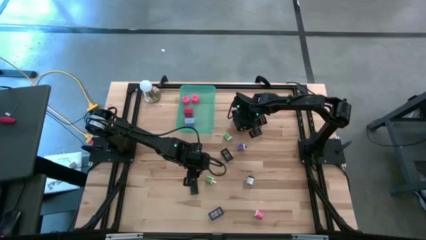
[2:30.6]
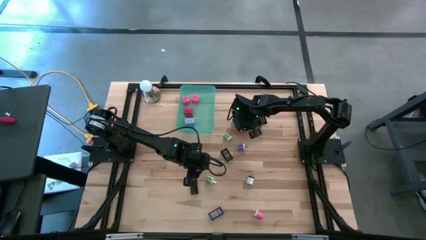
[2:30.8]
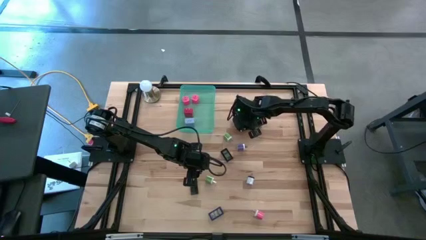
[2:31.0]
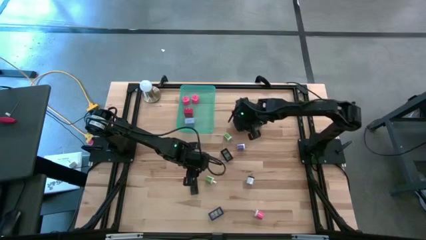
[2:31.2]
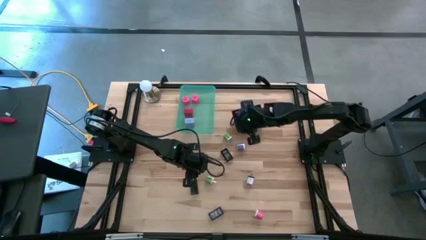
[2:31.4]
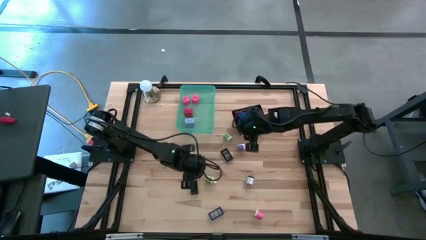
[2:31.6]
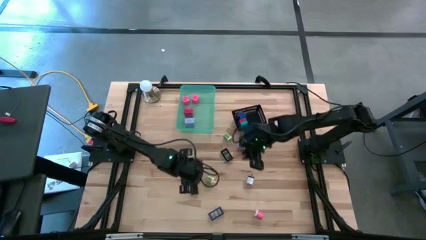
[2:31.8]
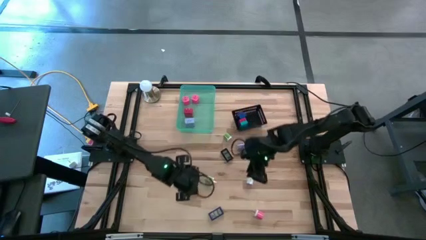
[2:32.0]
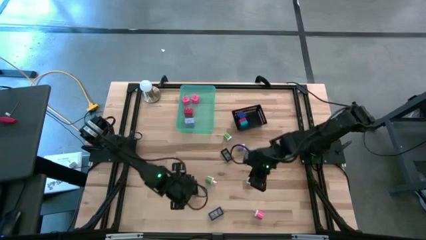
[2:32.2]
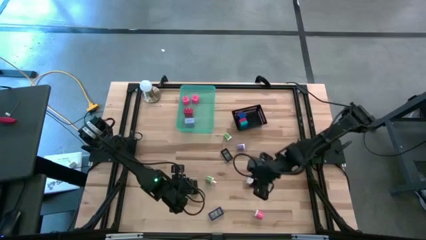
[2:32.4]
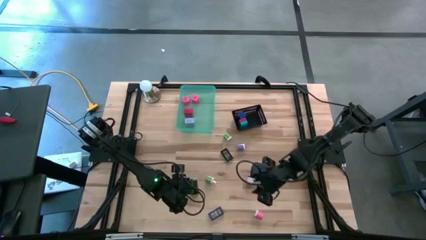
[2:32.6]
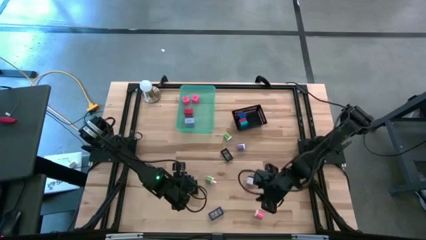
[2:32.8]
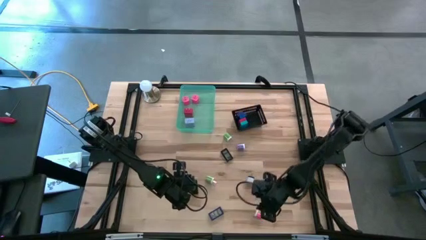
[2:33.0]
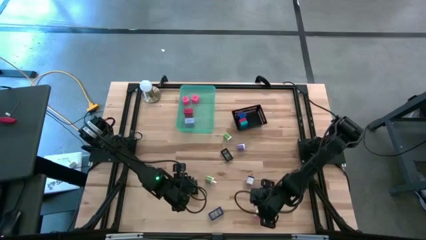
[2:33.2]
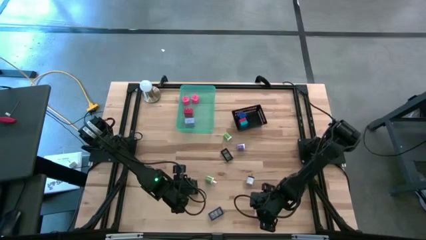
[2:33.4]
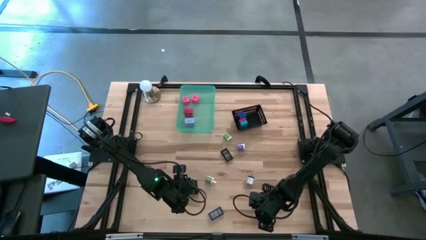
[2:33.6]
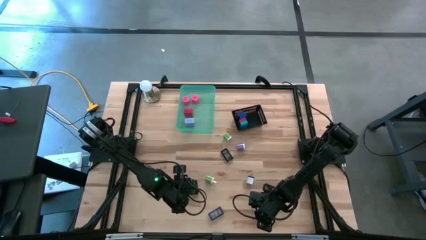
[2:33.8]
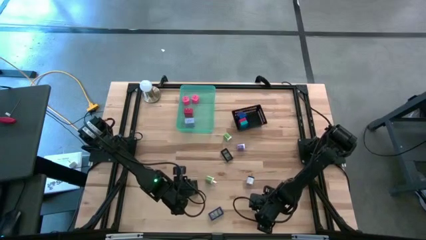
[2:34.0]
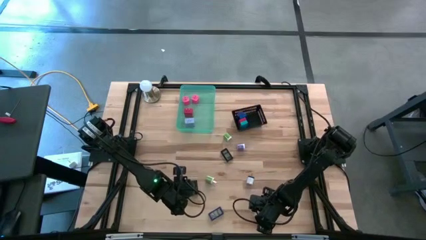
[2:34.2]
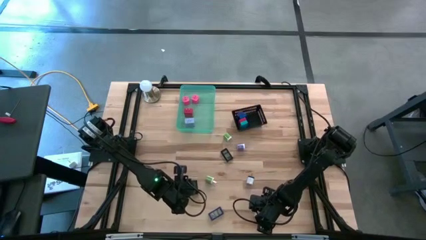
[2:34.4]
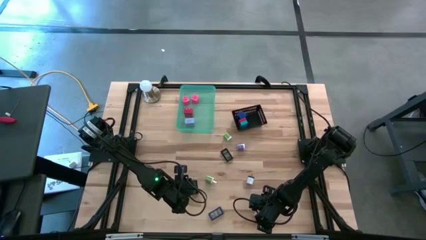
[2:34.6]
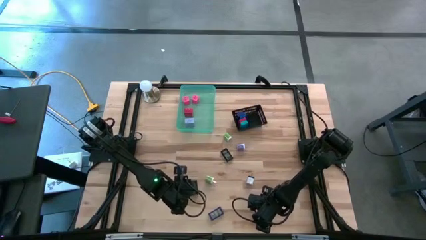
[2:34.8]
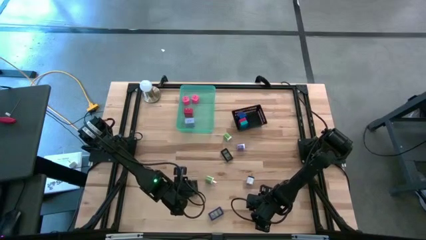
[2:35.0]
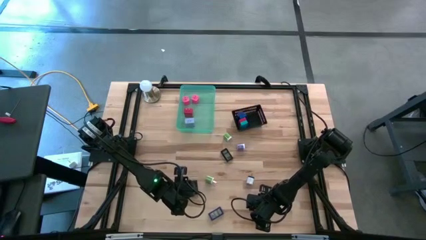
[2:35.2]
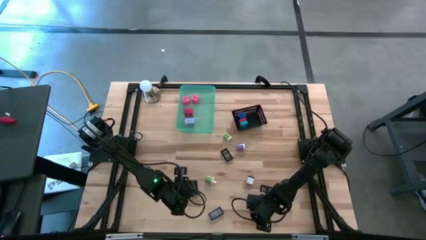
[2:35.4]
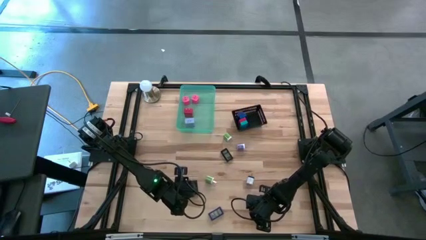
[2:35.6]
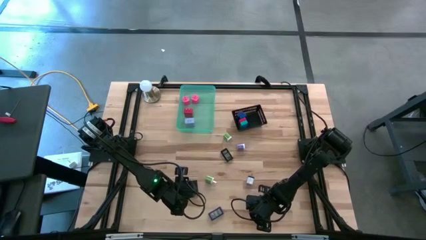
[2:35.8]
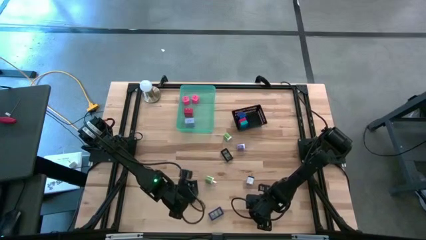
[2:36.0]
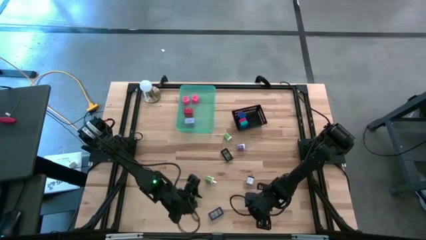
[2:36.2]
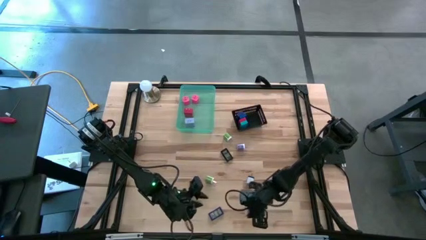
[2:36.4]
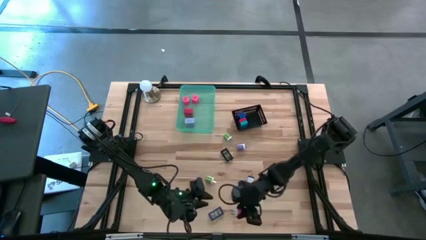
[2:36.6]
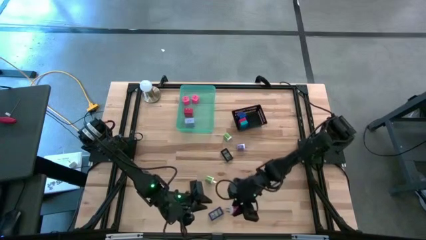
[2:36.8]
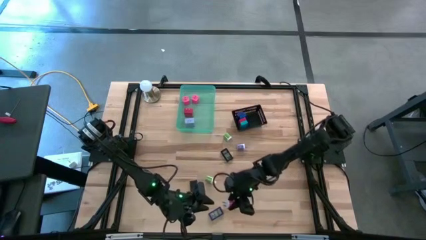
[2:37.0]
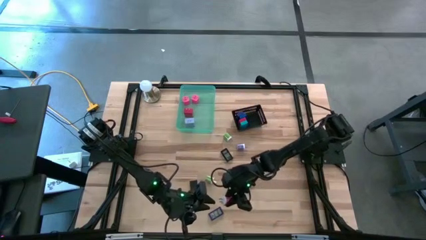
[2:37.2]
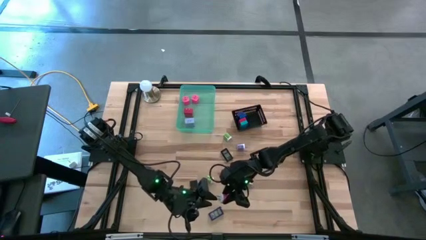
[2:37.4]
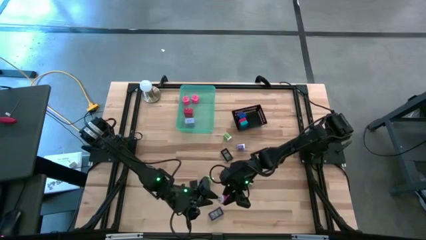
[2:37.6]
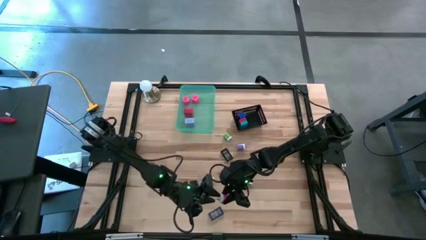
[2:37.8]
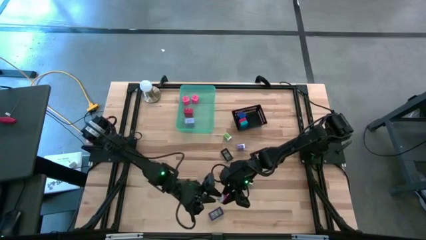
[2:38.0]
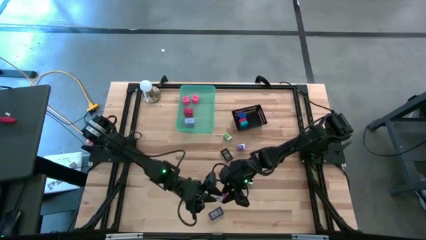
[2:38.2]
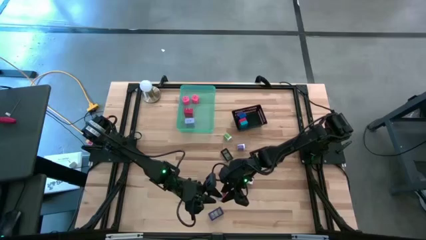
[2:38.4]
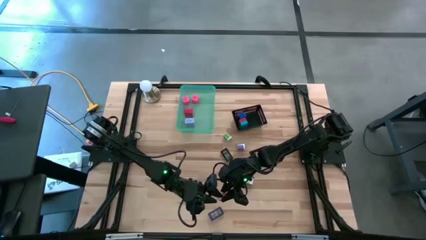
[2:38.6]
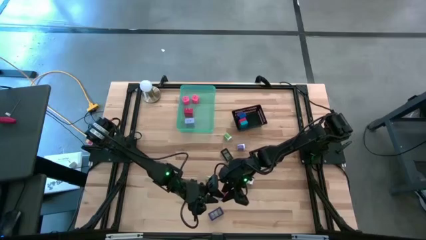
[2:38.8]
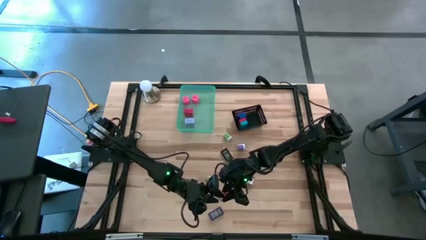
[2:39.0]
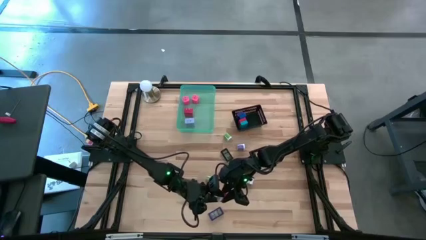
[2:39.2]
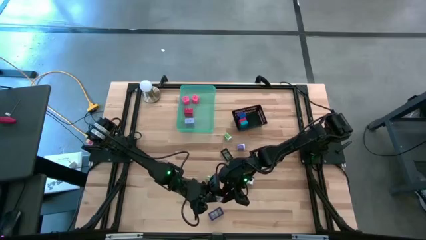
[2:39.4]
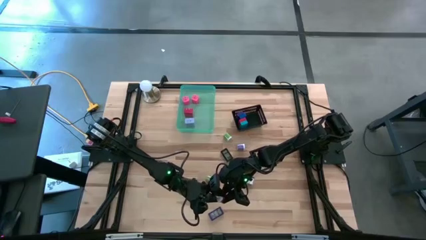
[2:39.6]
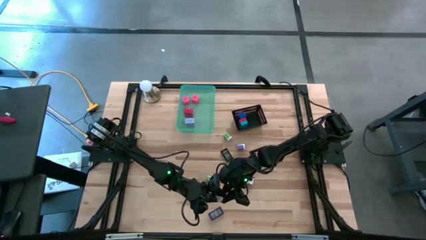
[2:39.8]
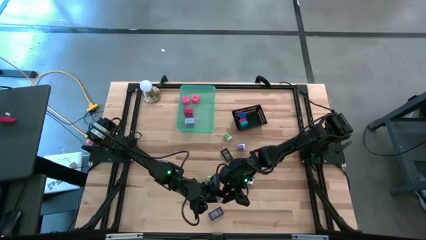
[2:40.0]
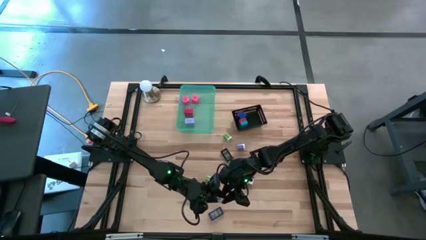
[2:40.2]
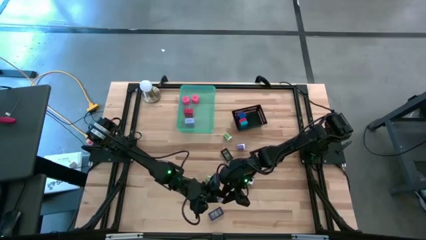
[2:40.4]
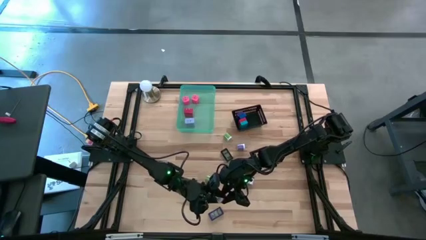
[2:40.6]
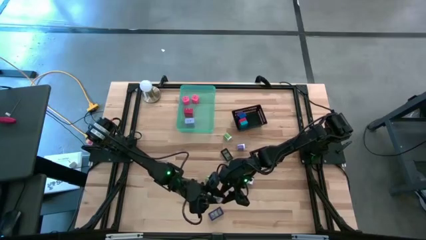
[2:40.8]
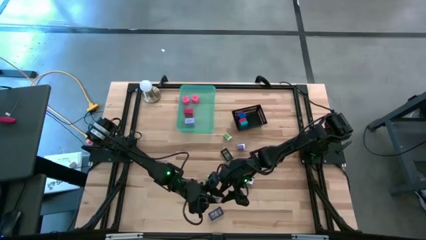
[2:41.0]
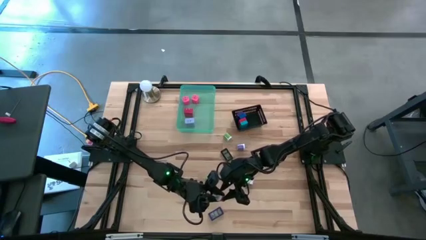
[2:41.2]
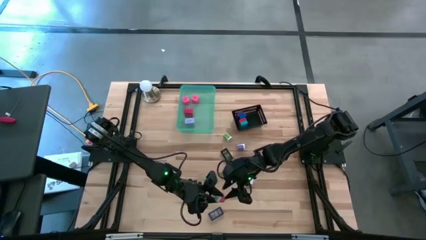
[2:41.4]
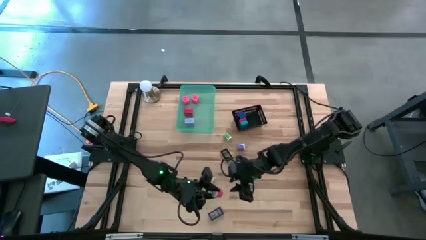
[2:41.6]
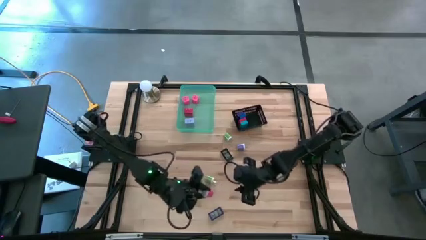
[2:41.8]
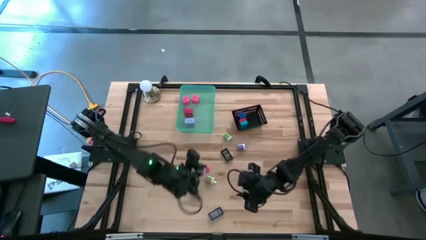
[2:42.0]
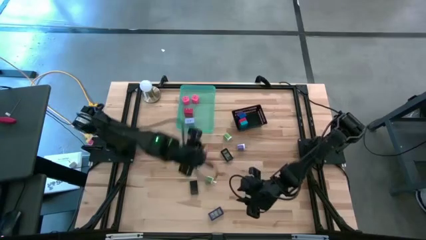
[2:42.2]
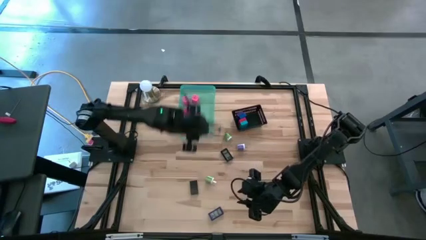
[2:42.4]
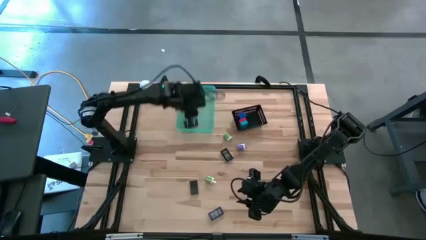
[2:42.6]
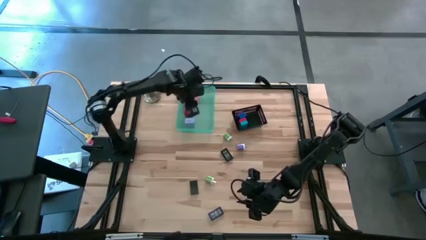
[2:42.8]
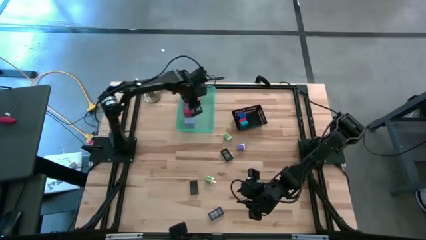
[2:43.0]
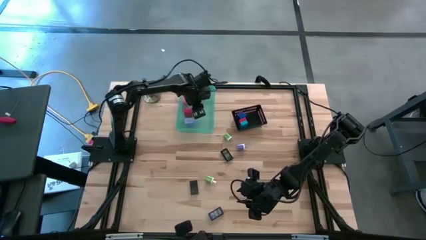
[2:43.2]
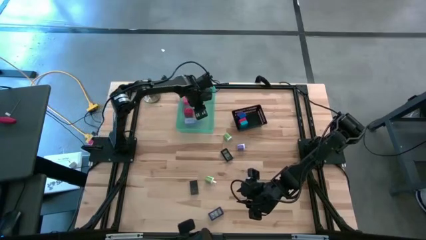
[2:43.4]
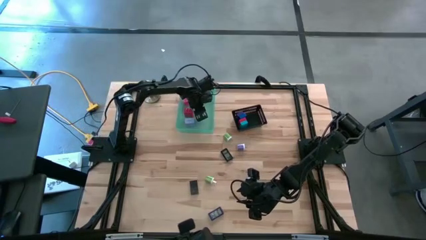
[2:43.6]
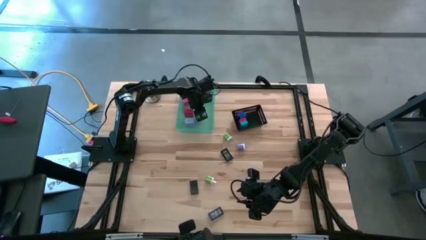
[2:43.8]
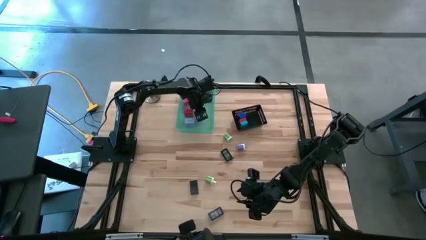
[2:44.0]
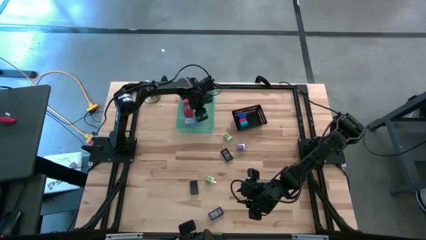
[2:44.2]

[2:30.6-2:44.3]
Task: Pick & Place Office items
Put the white pink charger adapter into the green bin

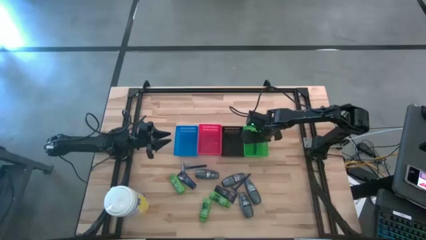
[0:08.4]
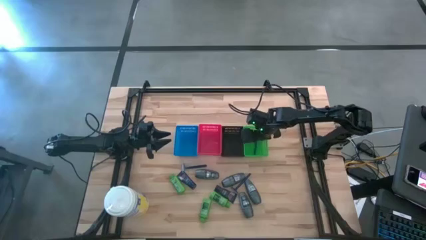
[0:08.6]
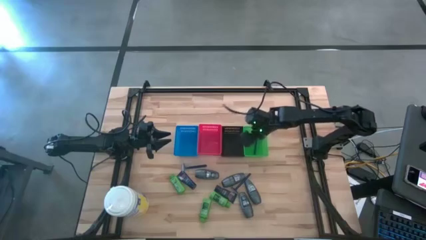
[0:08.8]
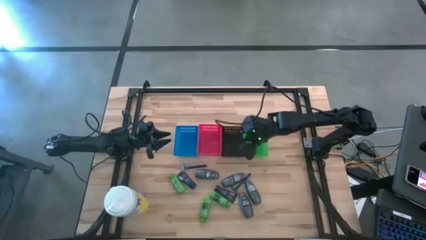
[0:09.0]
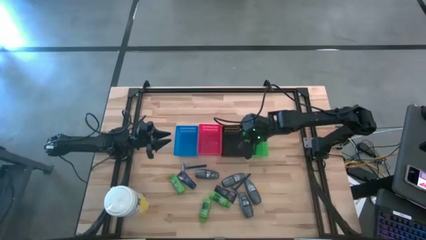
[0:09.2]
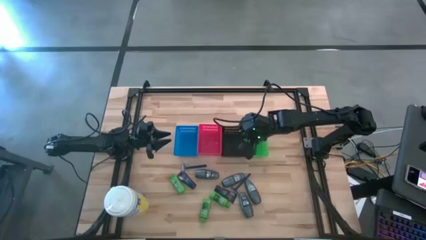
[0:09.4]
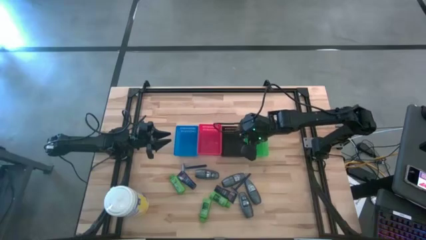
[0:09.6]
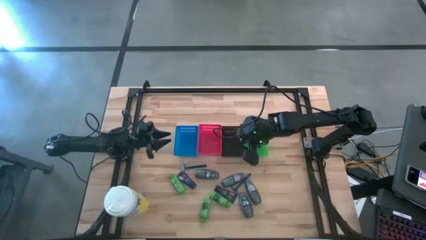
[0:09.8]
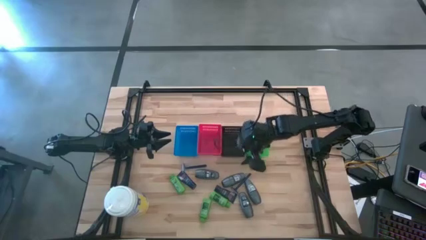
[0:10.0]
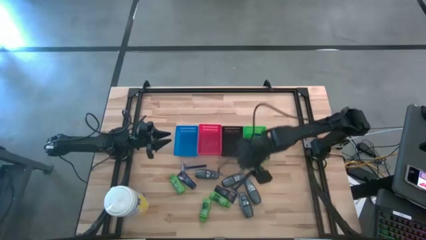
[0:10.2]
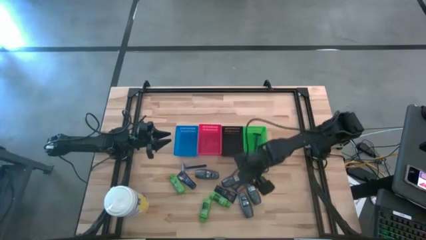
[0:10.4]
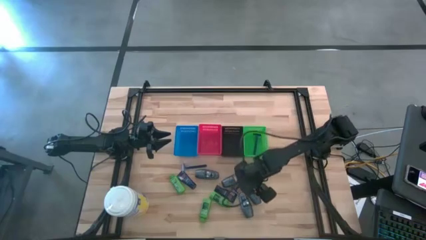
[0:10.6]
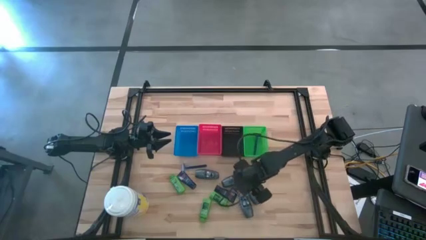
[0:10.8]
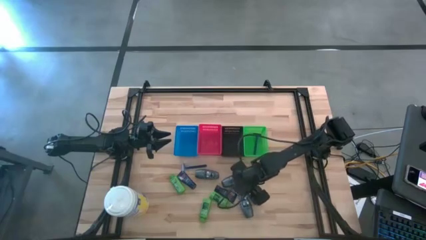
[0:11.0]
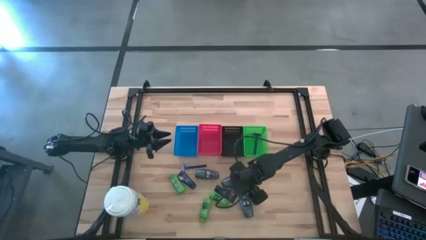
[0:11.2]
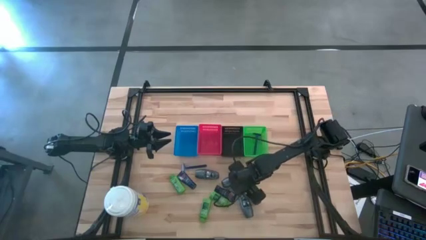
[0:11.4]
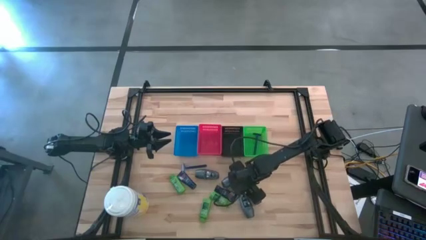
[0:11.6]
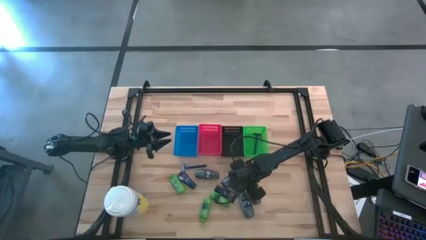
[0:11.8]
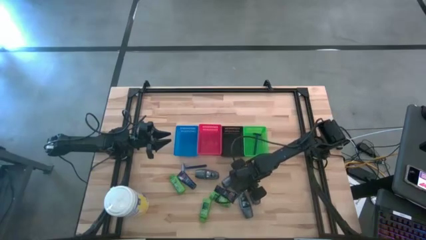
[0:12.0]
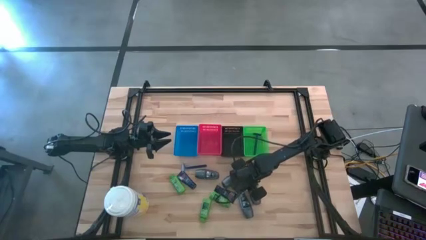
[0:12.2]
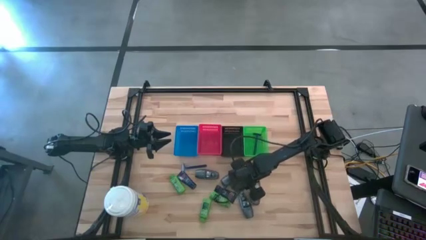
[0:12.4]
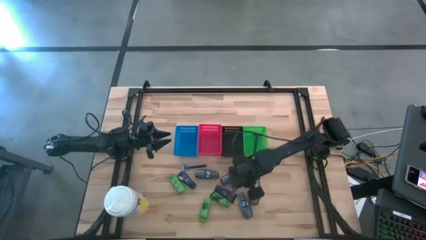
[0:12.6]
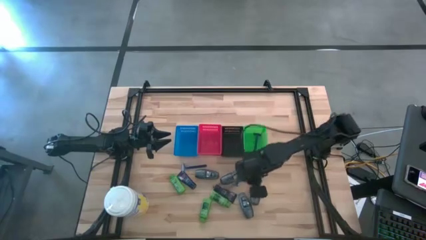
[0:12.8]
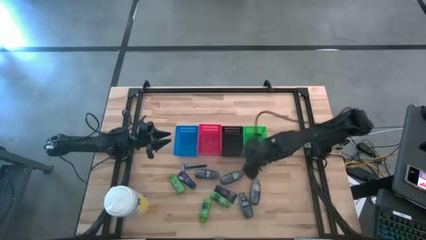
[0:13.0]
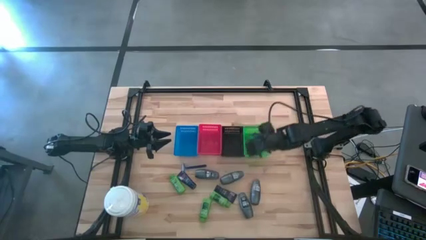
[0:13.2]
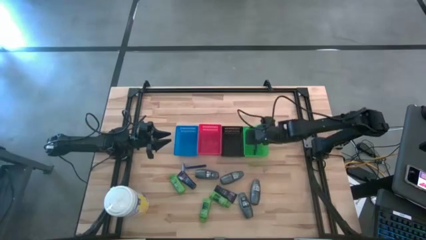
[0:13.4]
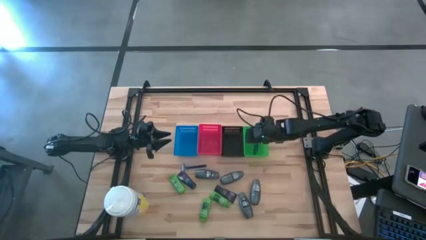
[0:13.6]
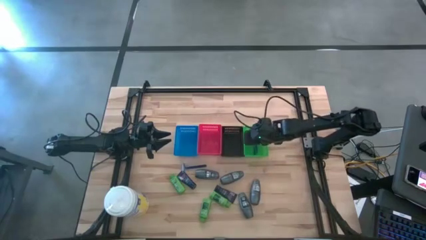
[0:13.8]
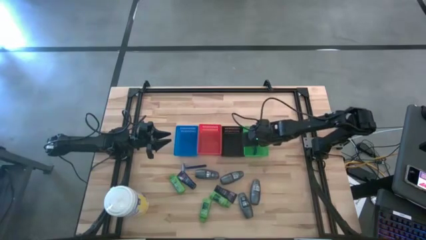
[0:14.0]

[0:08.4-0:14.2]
Task: Pick & Place Travel size toiletries
Put the razor into the green basket
